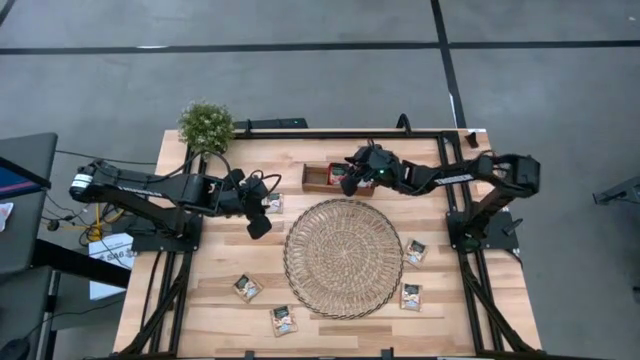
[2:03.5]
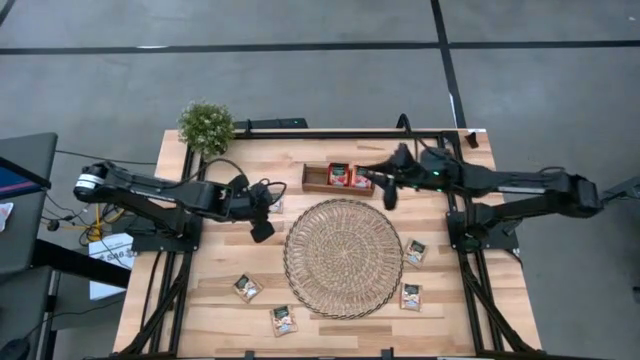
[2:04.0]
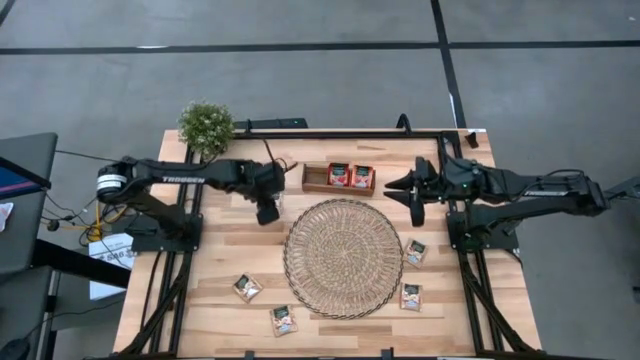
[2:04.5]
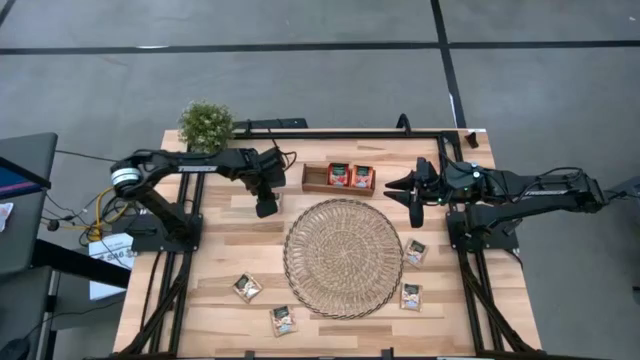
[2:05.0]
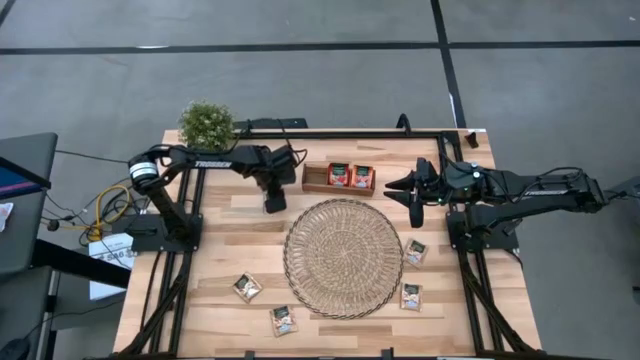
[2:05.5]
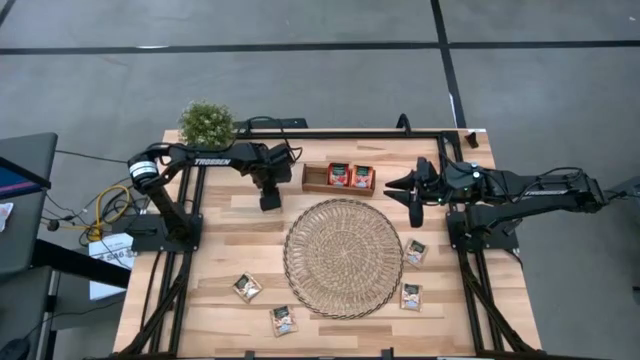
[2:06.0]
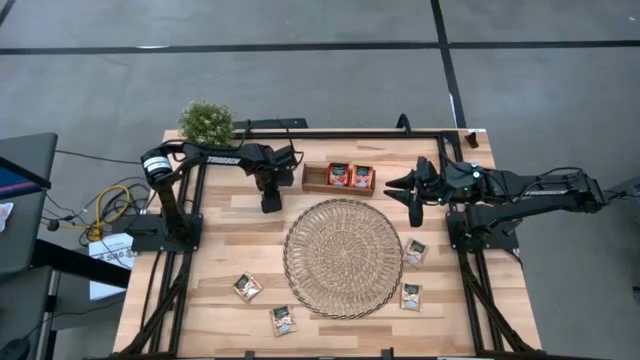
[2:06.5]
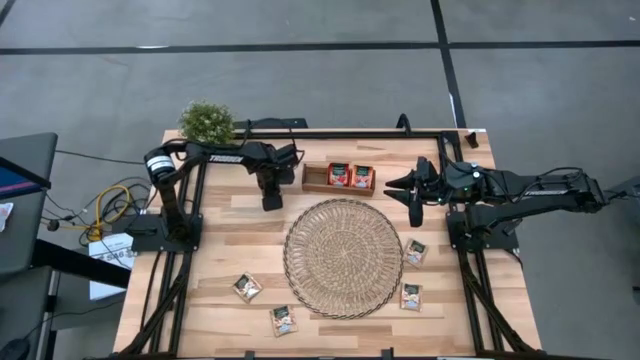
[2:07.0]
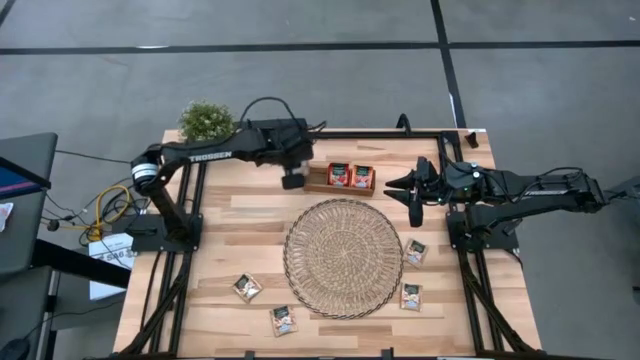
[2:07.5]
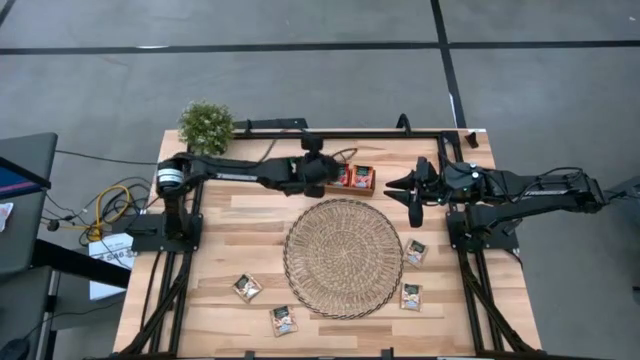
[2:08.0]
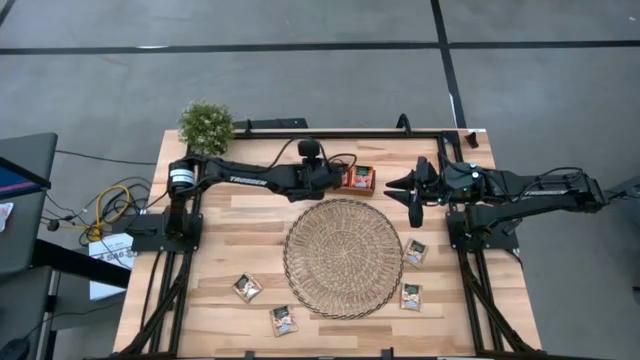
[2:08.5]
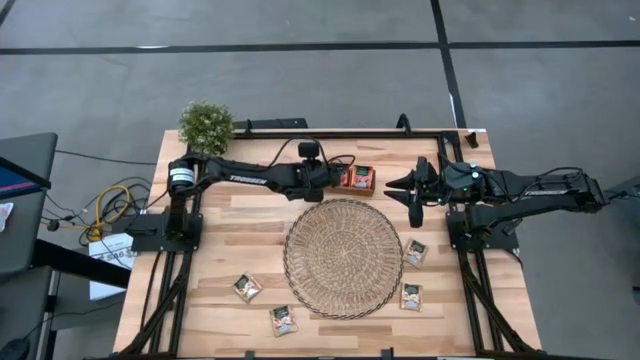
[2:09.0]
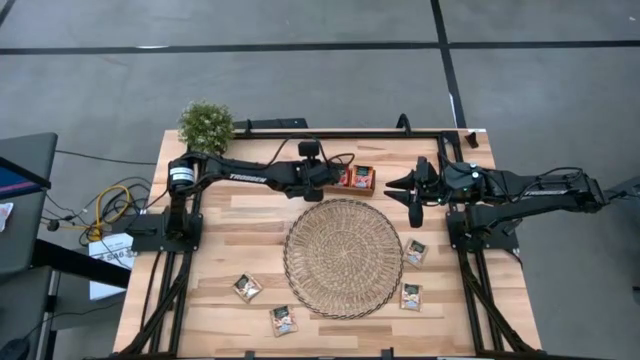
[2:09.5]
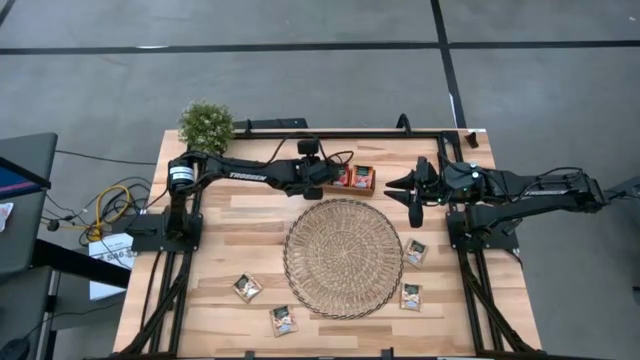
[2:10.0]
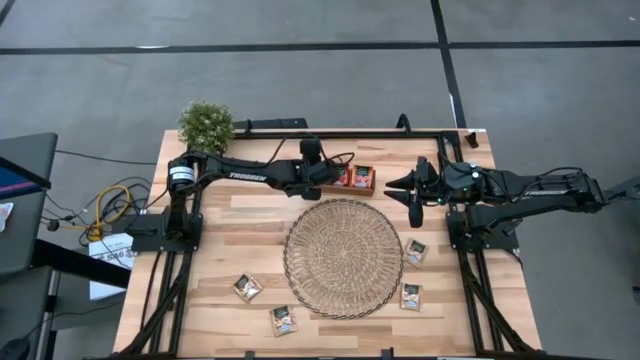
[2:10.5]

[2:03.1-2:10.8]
Task: Pick & Place Tea
Put the brown tea bag into the left section of the wooden organizer

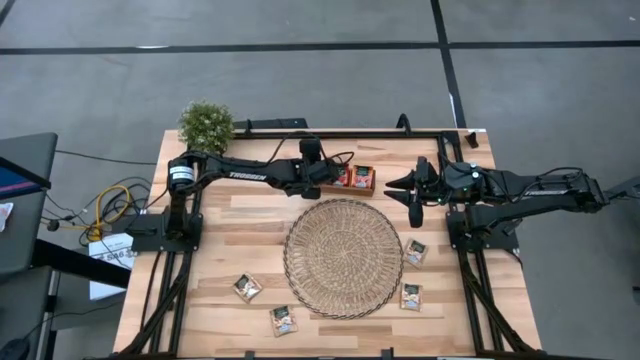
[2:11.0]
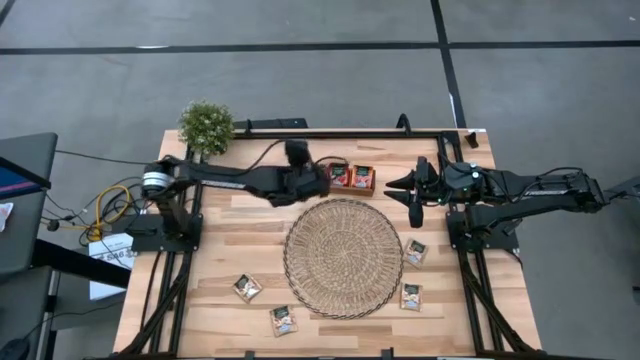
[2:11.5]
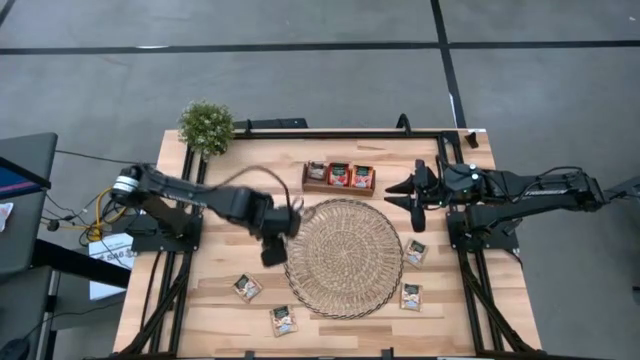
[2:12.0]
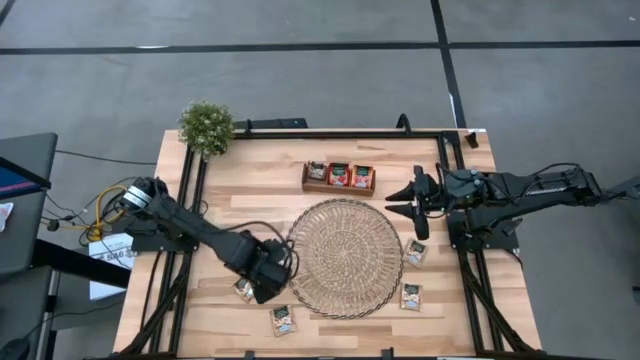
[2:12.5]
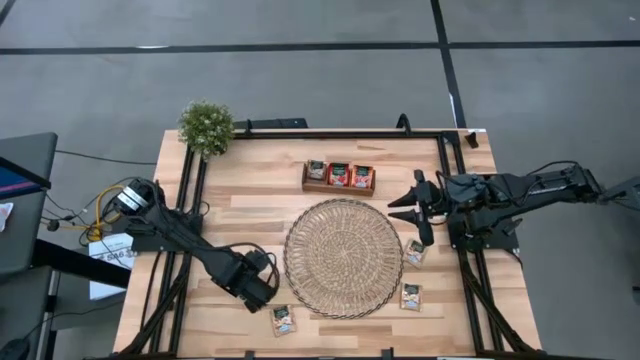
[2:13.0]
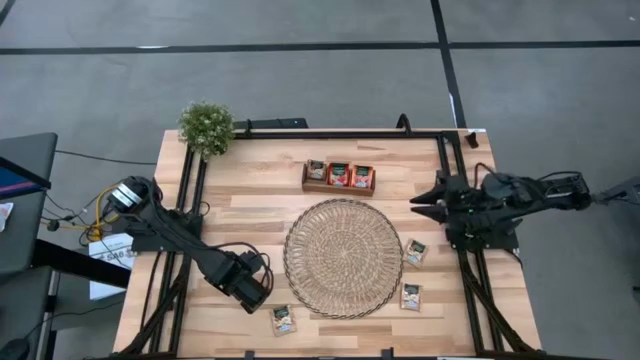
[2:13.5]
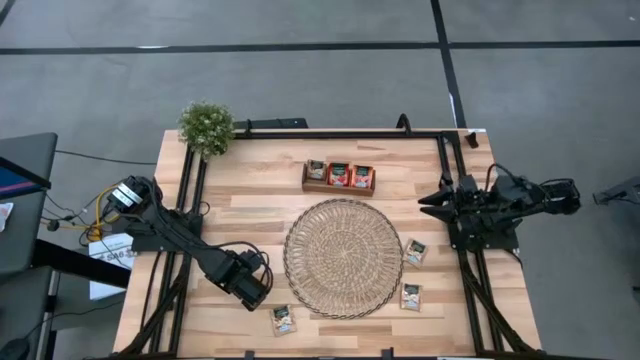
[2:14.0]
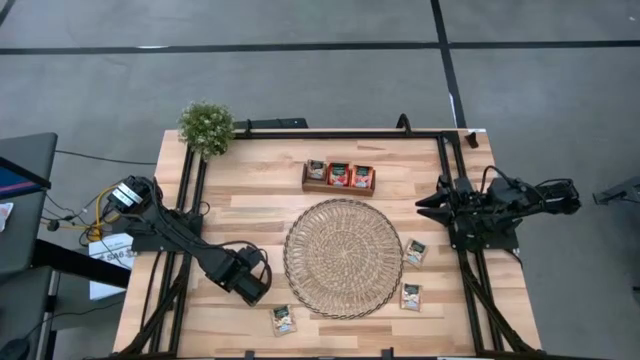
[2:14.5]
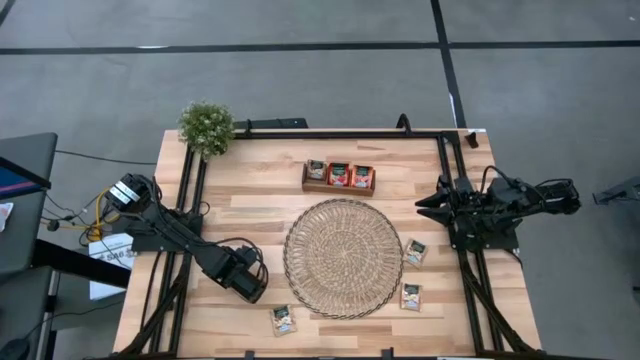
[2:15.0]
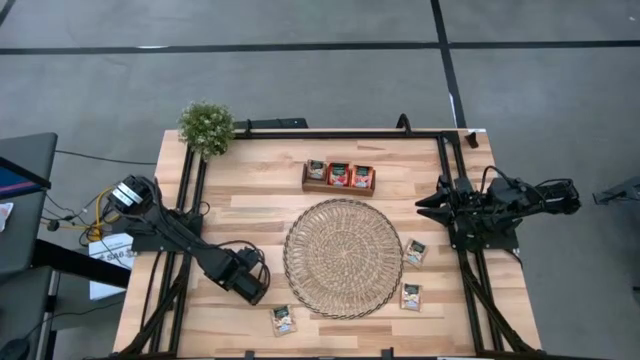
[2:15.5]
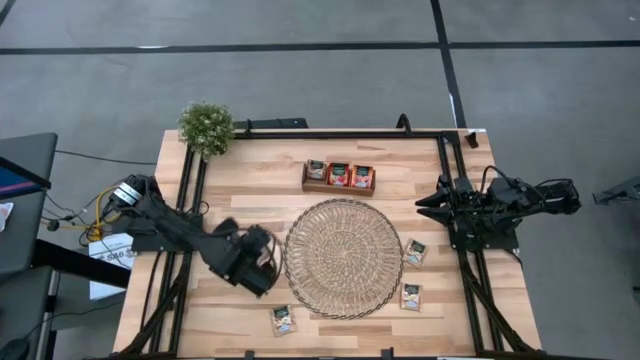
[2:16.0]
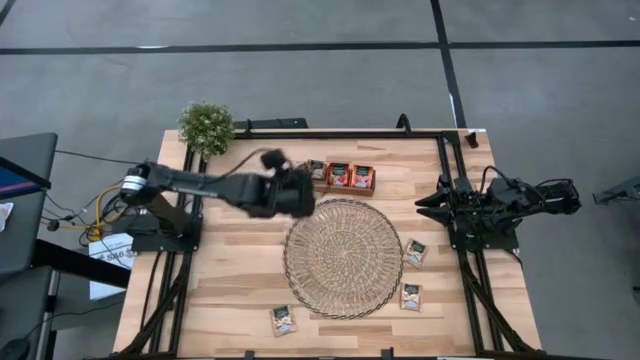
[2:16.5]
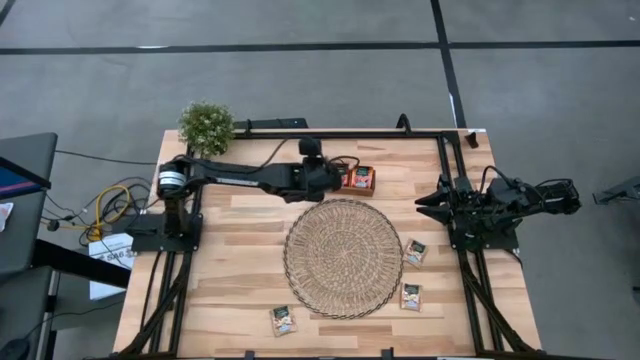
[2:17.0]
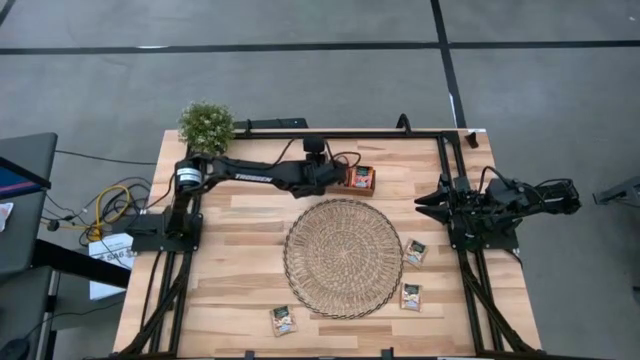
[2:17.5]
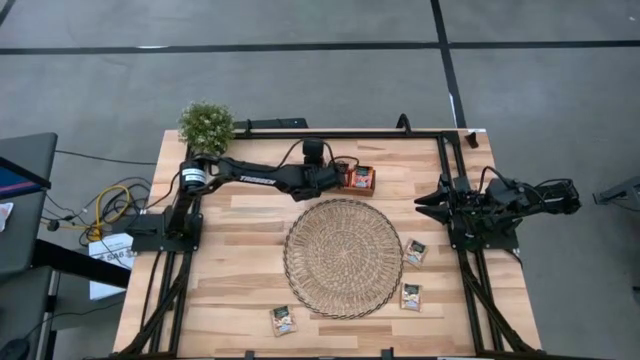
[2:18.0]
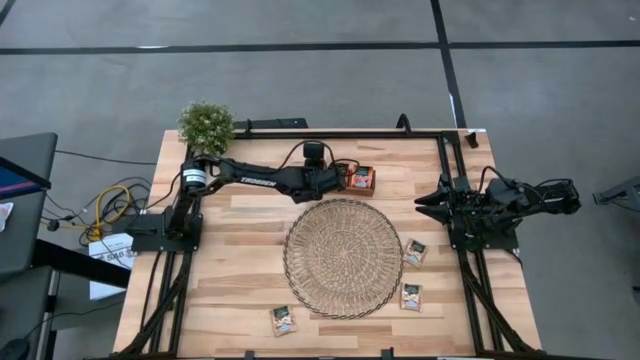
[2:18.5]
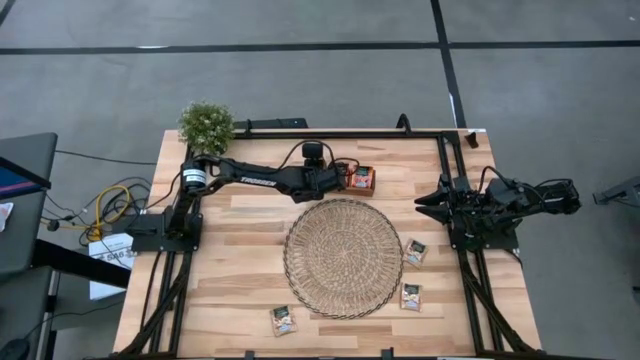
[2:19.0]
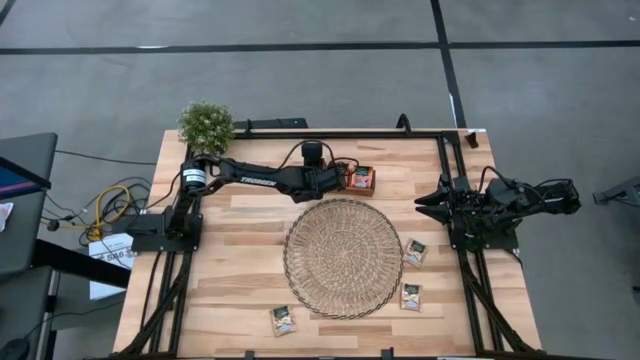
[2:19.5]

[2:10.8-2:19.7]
Put the brown tea bag into the left section of the wooden organizer

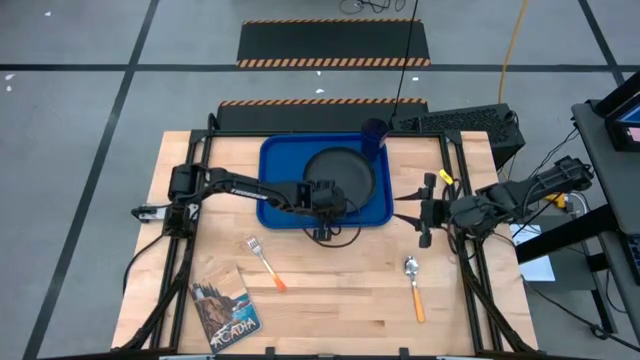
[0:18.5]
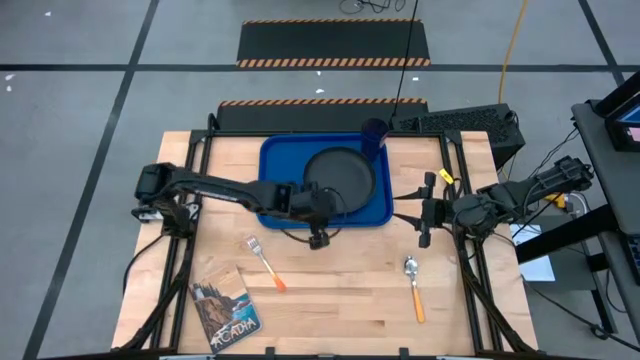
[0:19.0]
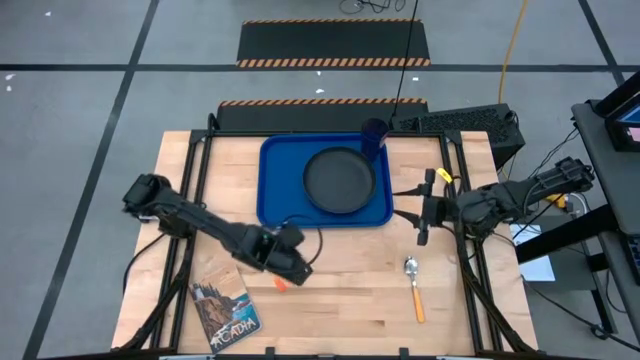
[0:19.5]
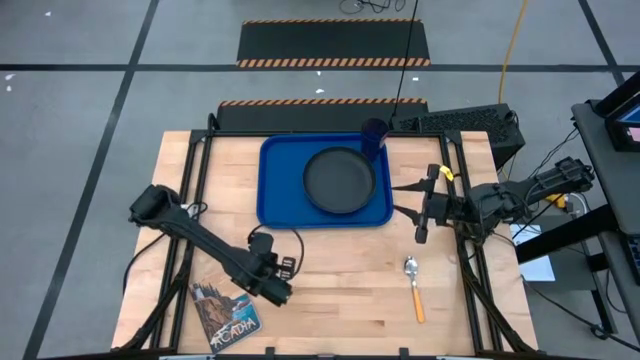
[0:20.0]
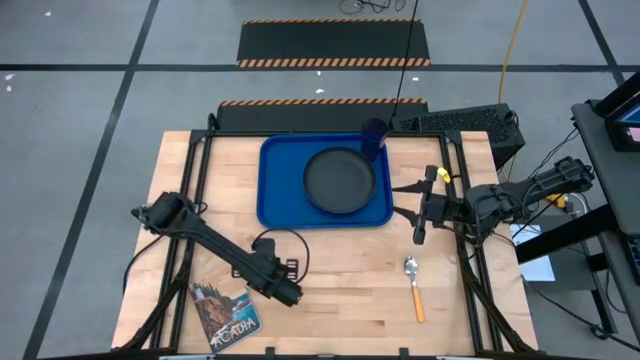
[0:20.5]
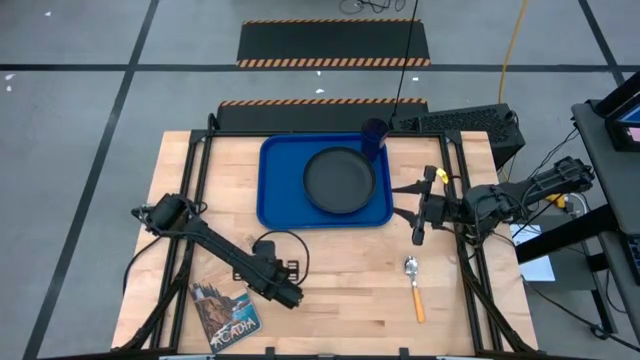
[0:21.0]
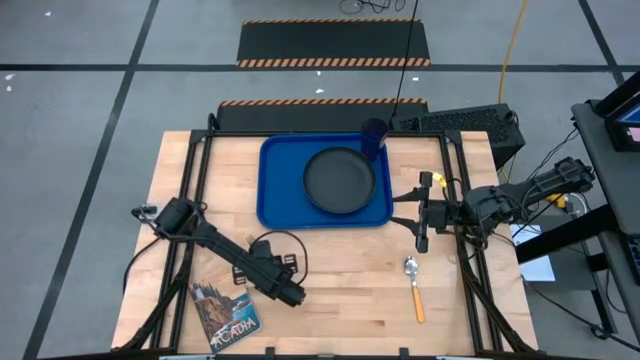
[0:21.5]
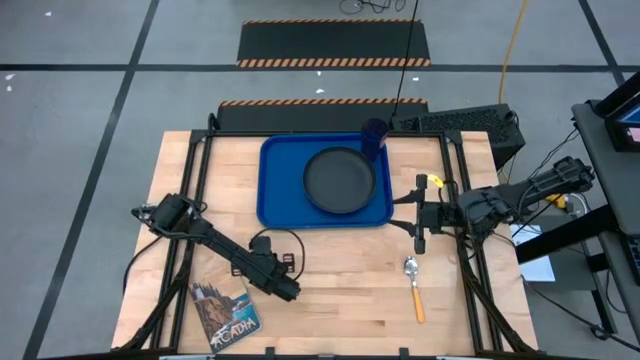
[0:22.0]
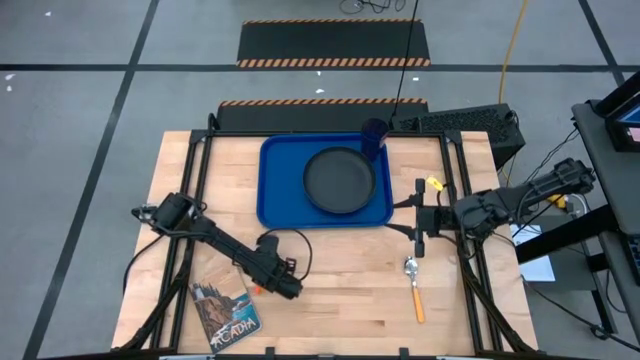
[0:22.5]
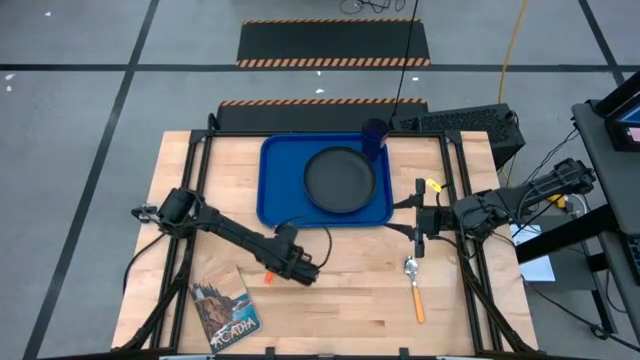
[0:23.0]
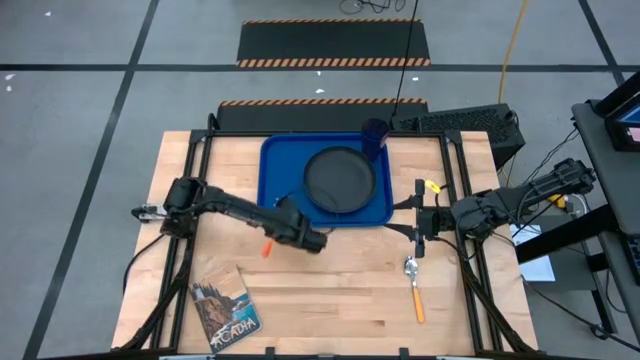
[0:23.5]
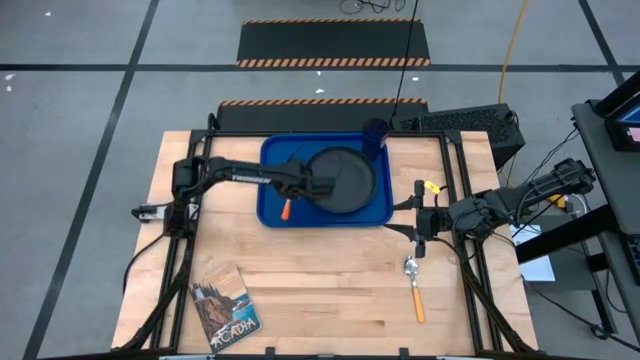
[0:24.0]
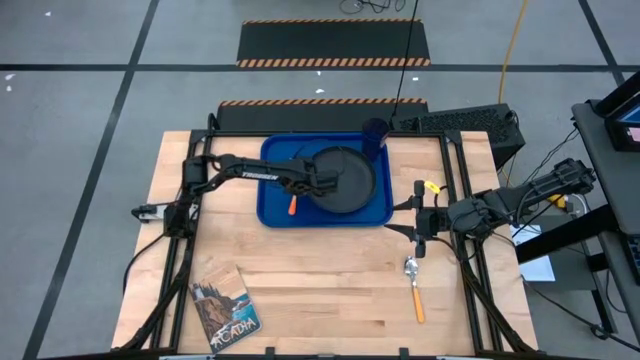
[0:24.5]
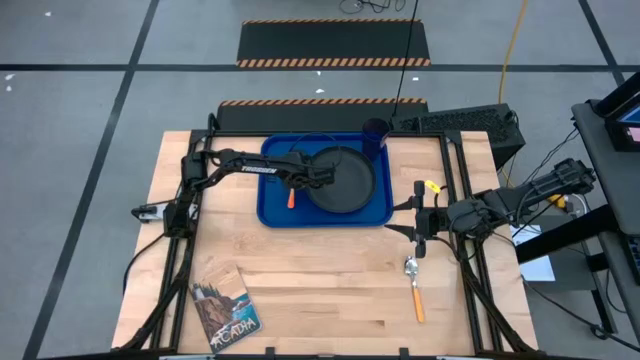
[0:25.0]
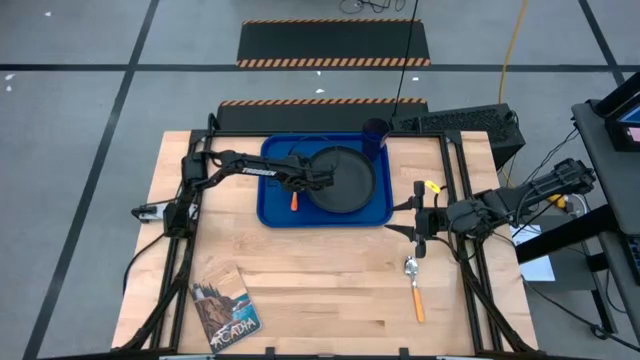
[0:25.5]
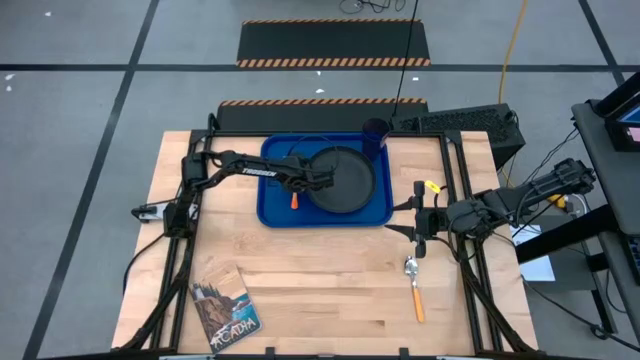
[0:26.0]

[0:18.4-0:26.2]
Task: Pick and place plate/cup/fork/spoon on tray
Put the orange fork on the blue serving tray to the left of the black plate
